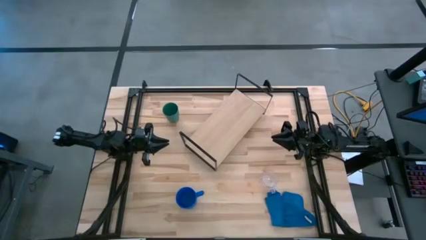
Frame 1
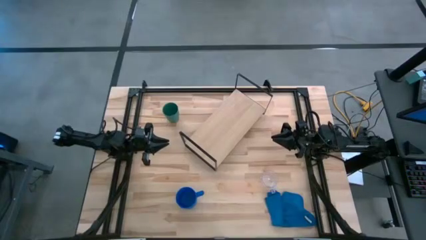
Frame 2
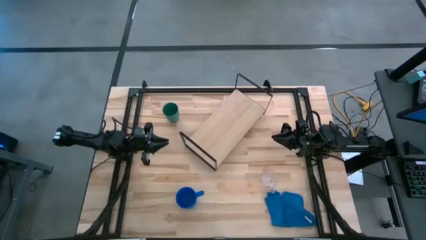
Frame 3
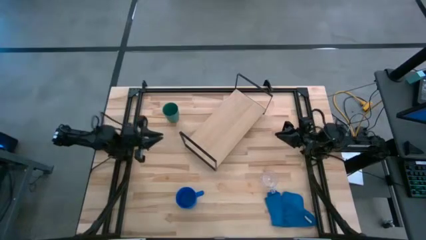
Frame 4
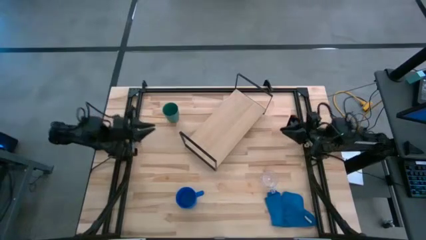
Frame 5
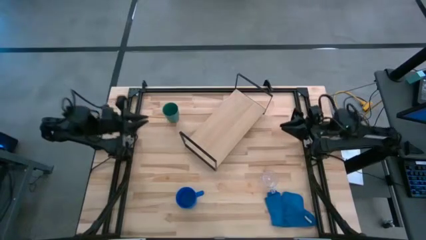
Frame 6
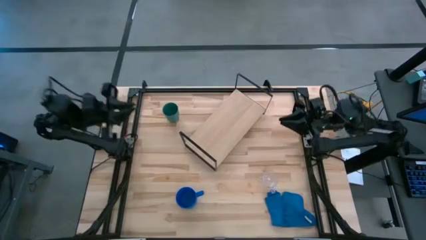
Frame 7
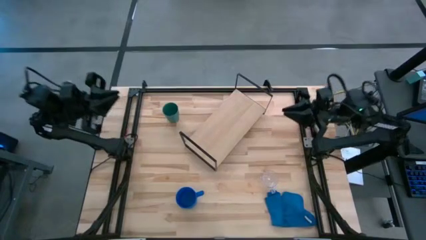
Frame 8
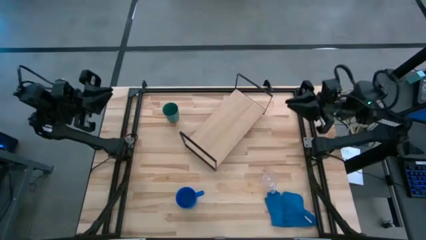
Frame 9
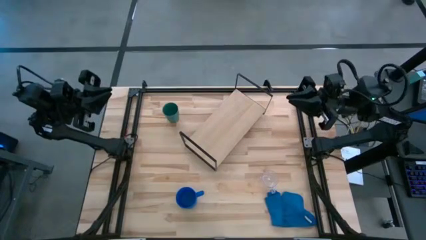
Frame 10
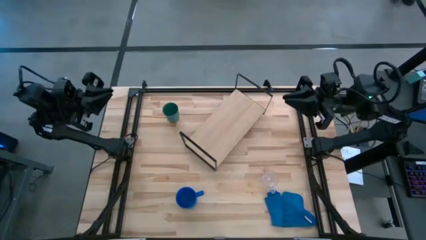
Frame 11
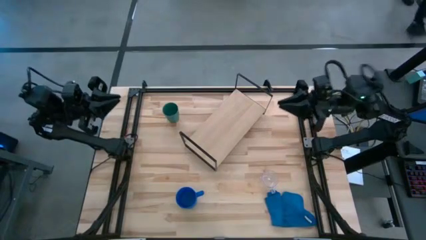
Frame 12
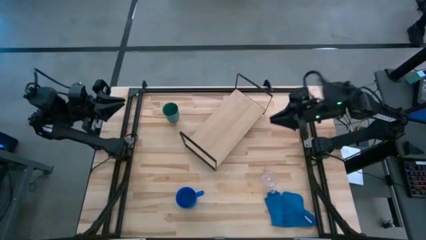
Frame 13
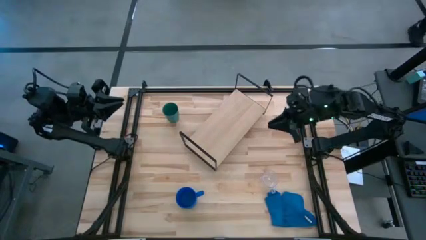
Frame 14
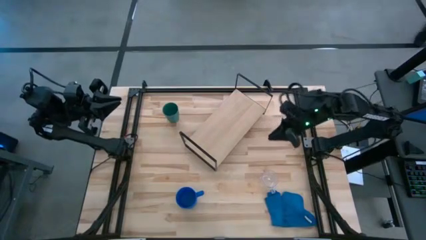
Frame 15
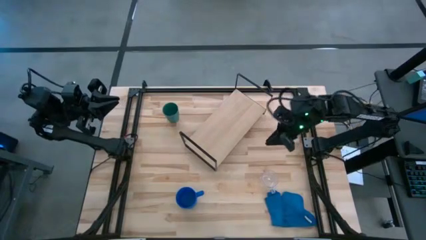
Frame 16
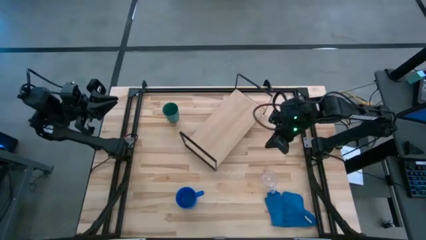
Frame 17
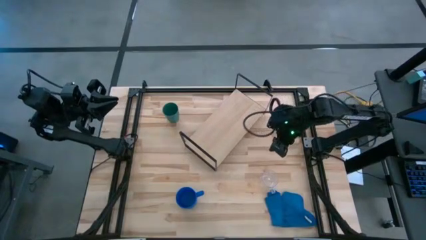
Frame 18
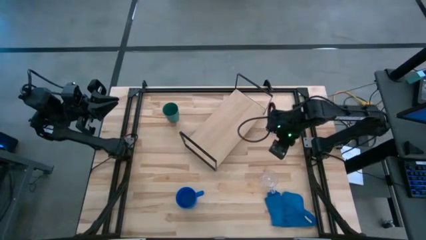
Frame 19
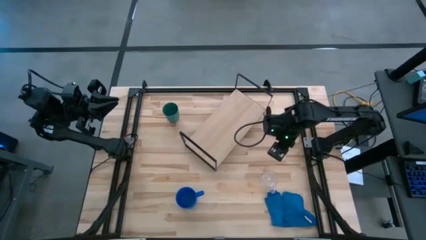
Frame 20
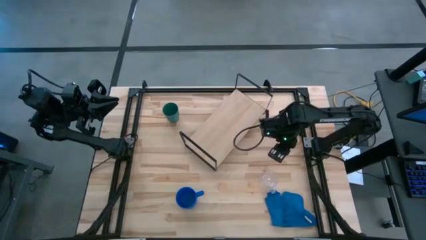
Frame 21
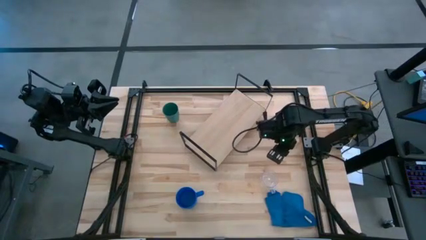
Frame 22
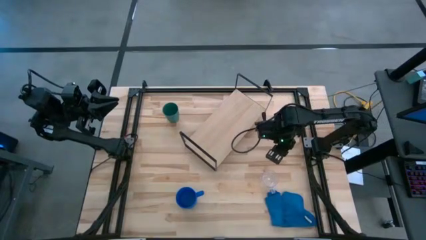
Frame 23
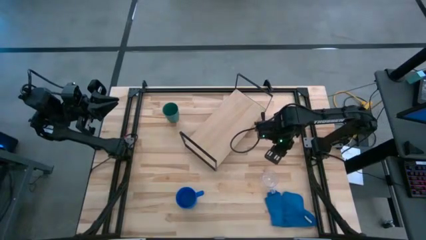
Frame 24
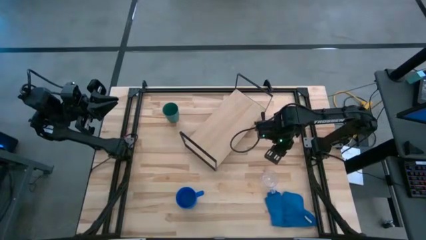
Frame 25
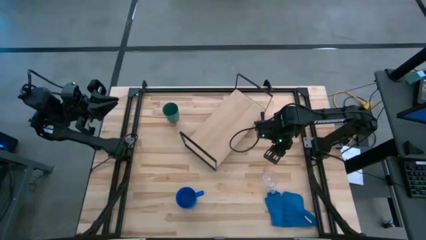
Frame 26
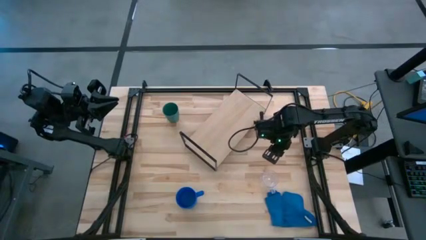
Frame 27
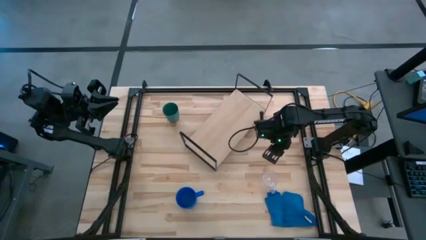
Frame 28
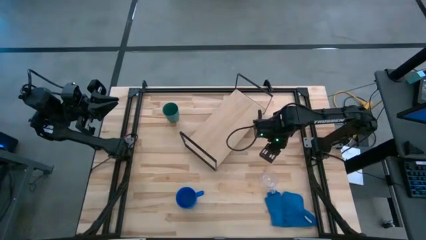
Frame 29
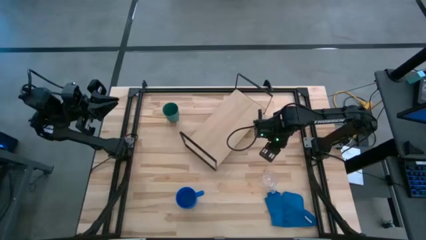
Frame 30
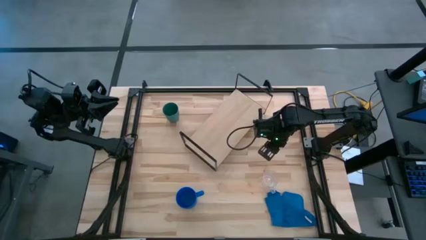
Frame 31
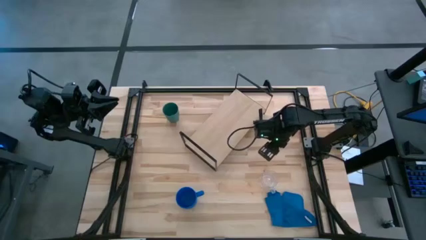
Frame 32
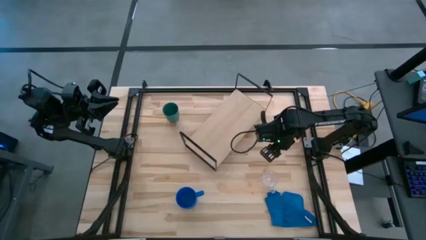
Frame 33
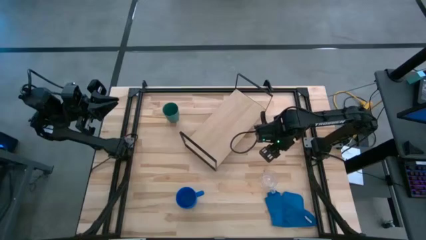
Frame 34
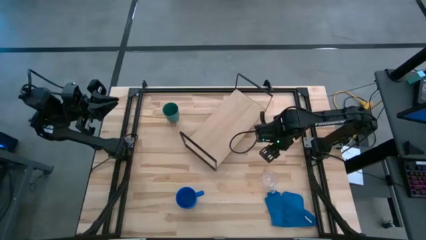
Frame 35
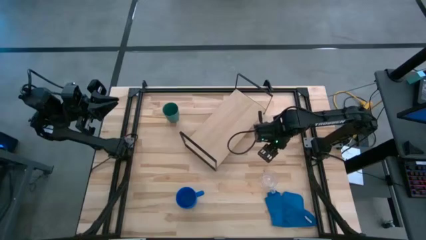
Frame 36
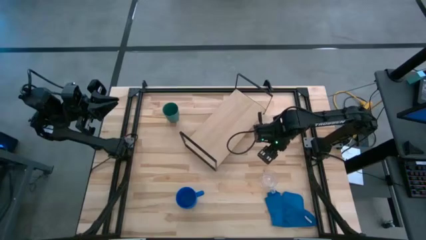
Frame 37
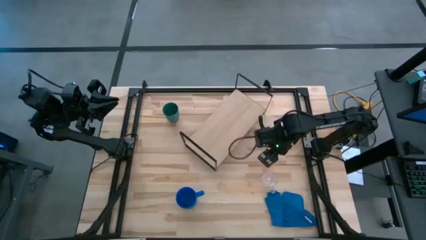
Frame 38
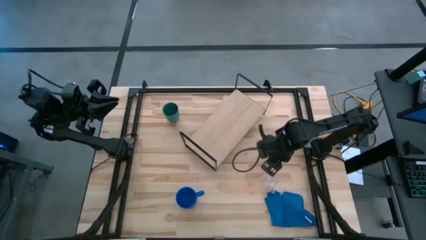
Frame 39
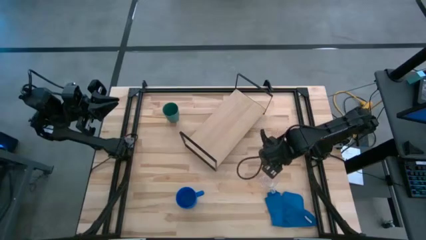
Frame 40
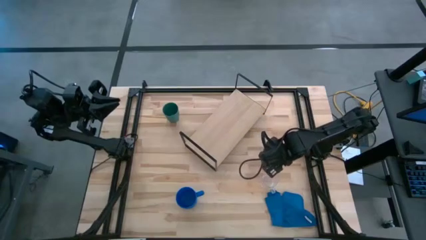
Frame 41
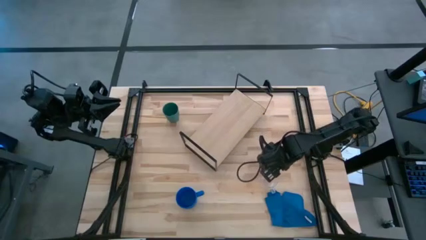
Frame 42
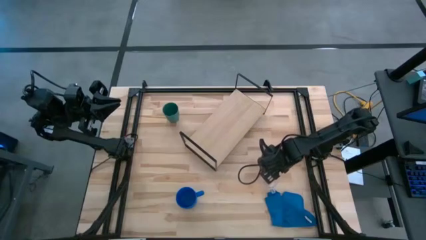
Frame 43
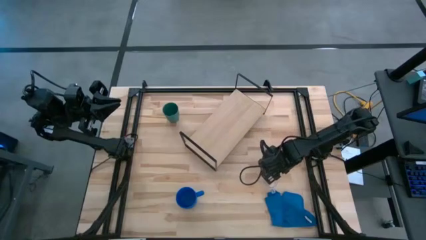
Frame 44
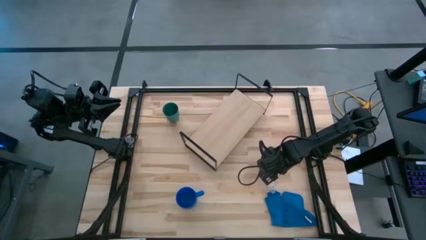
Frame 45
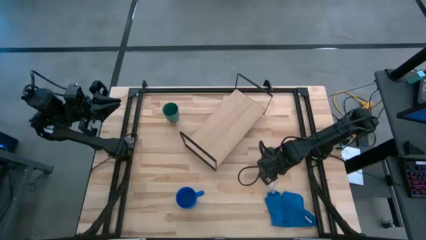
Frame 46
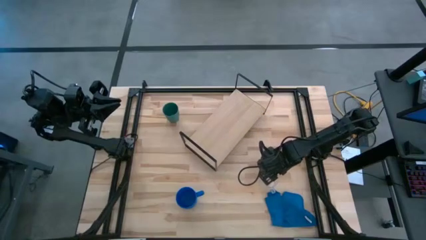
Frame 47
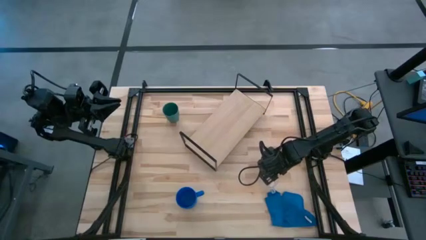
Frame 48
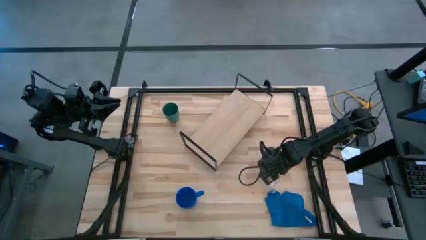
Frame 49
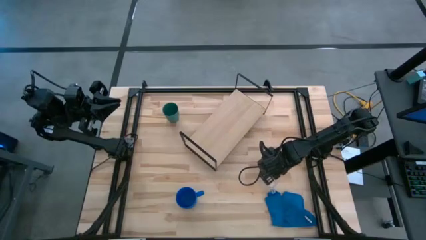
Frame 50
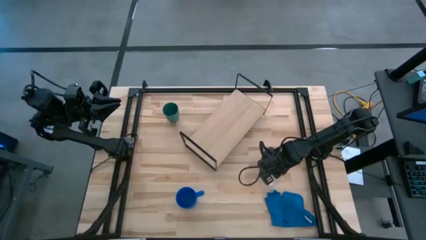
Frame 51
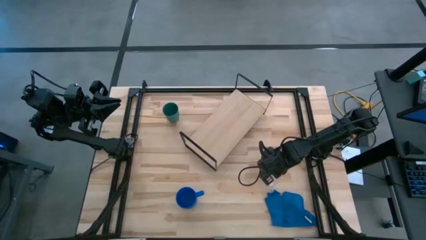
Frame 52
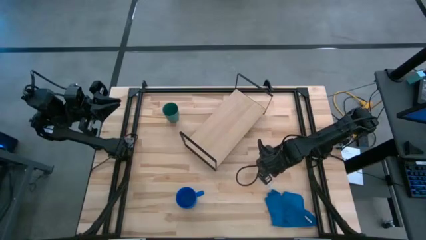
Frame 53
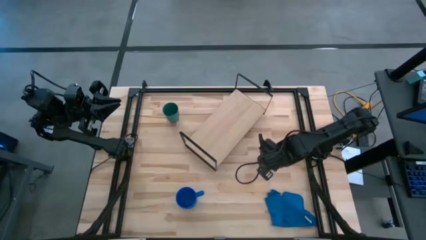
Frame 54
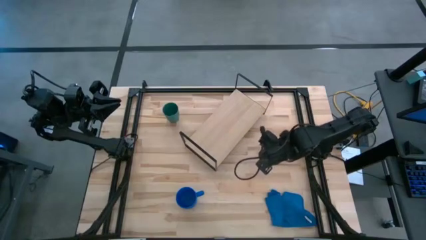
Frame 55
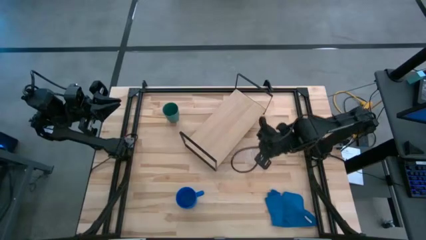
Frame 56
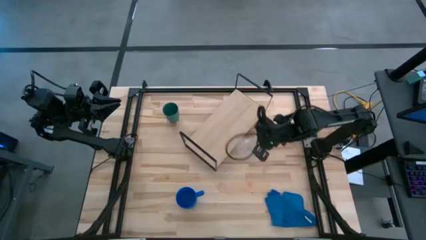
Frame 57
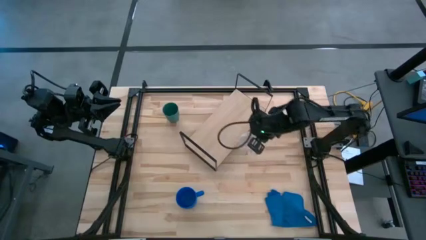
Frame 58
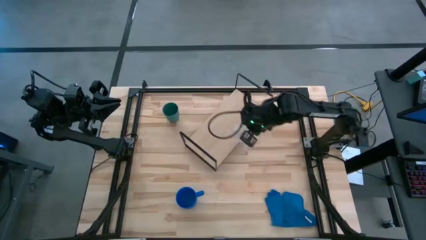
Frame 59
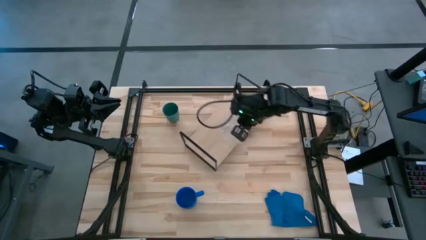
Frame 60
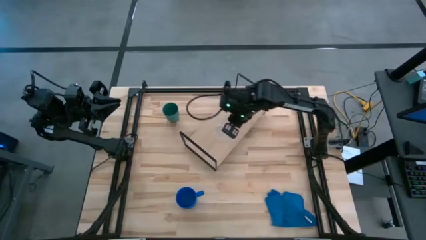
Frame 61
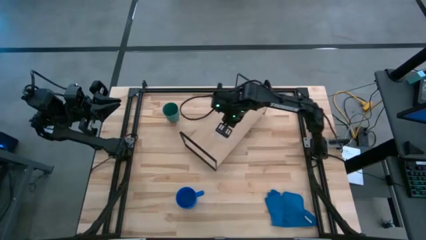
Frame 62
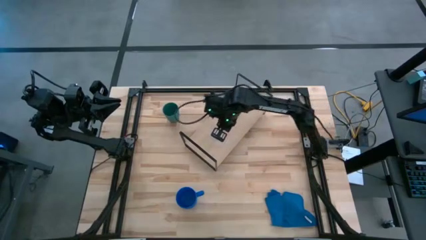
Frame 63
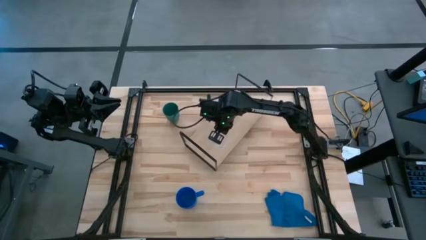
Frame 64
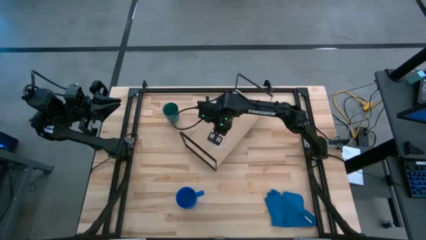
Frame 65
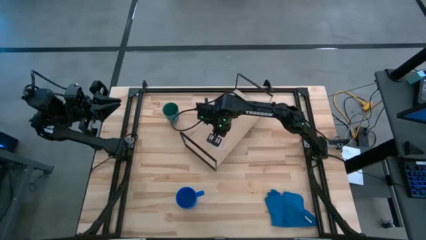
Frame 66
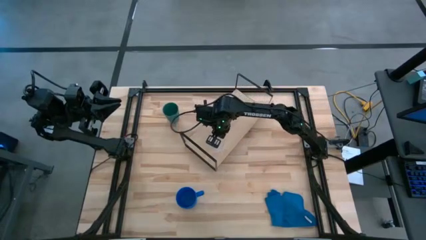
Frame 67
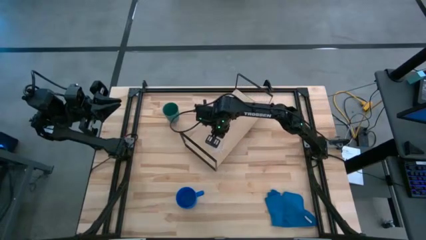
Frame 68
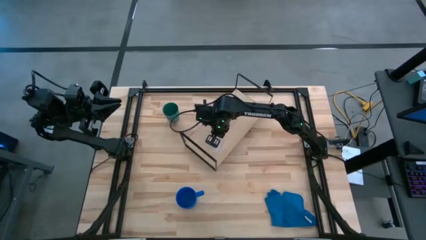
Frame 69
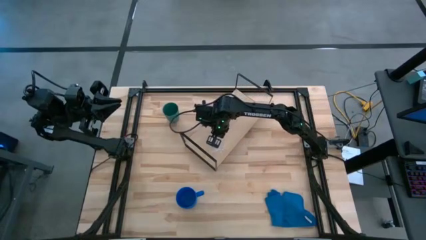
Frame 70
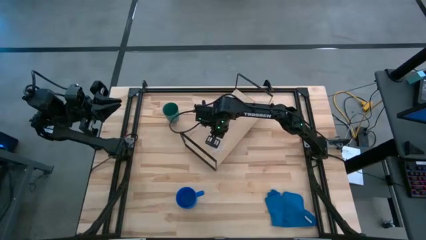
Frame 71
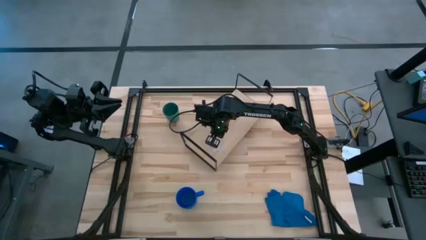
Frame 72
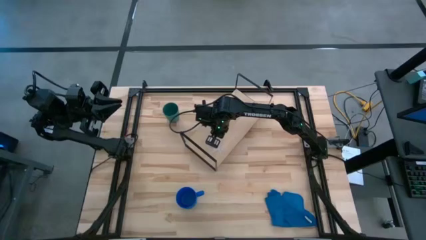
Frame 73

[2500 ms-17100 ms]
Task: Stack small to large cups/mugs on shelf
Put the transparent mug on the shelf
